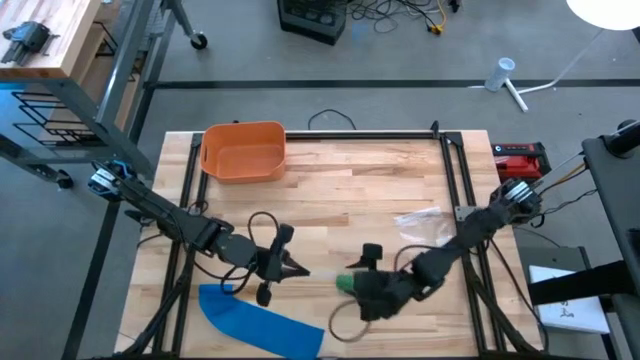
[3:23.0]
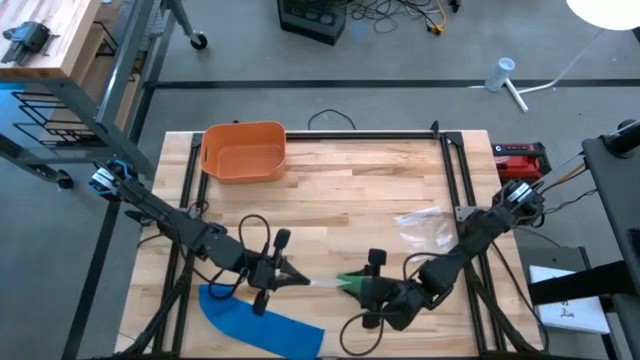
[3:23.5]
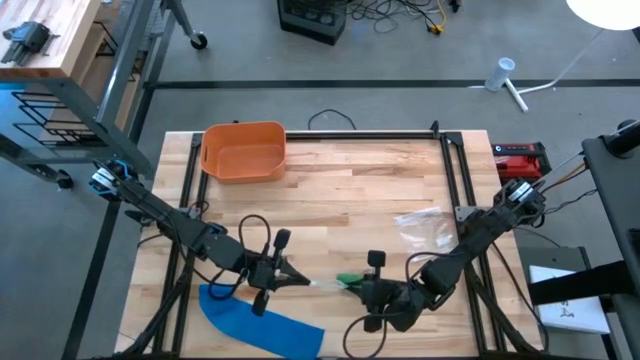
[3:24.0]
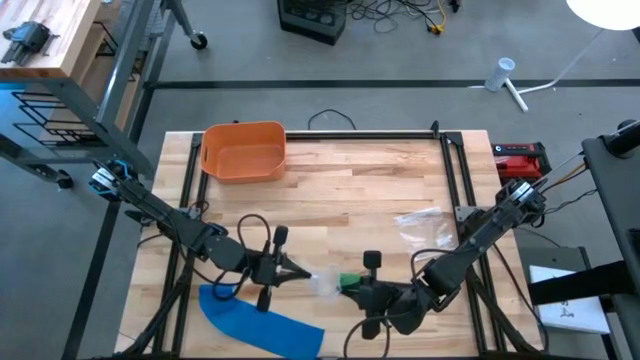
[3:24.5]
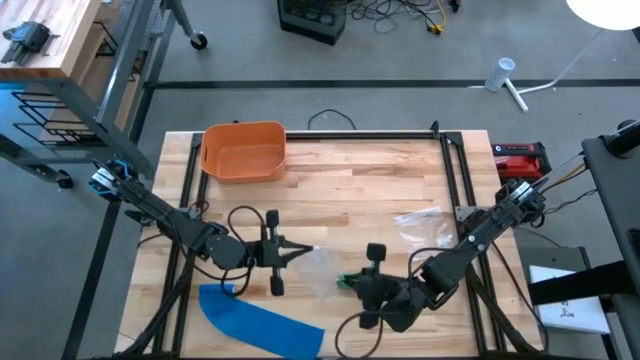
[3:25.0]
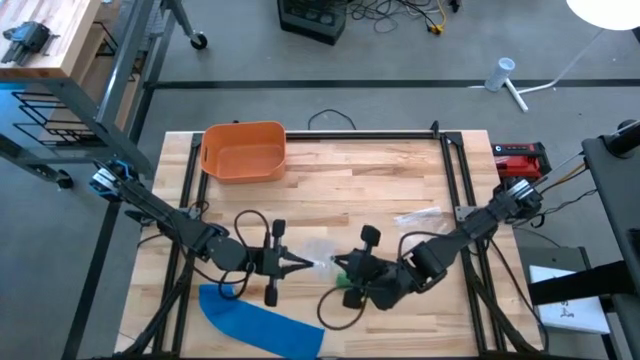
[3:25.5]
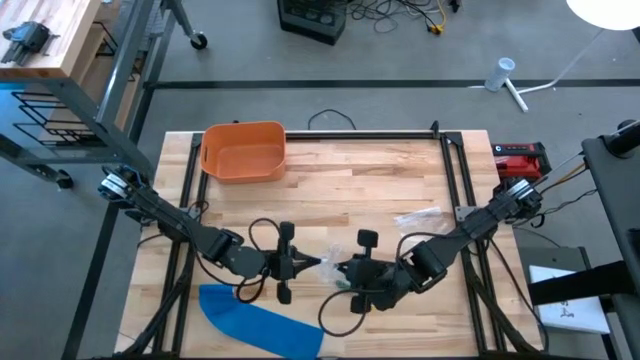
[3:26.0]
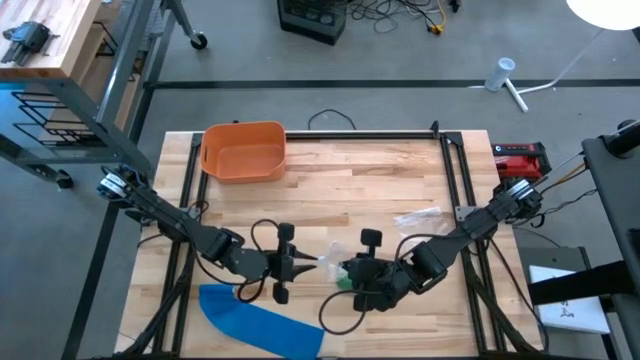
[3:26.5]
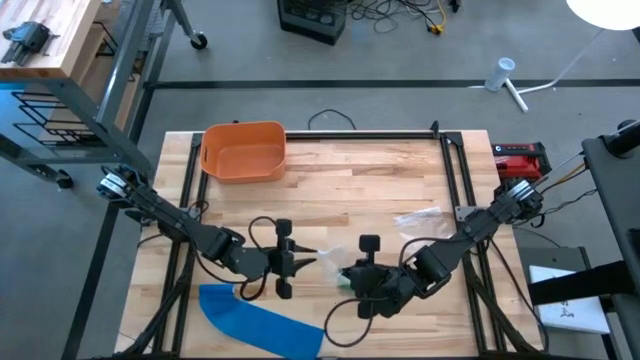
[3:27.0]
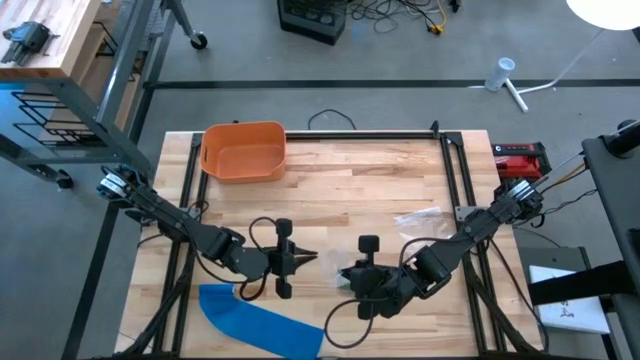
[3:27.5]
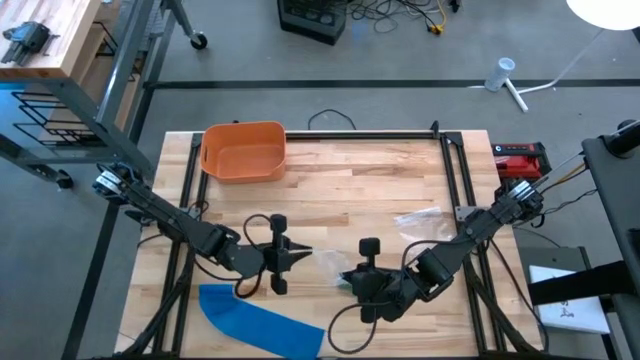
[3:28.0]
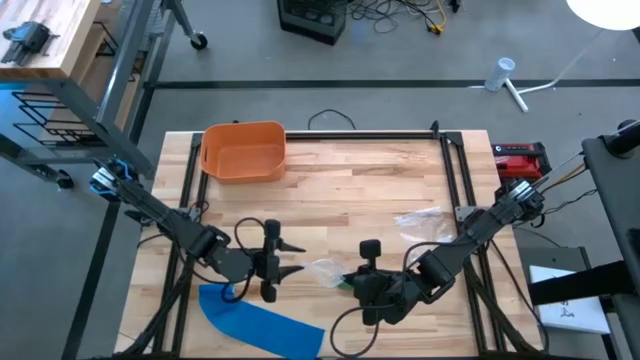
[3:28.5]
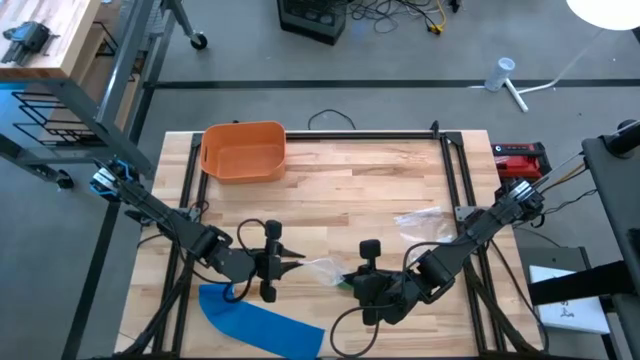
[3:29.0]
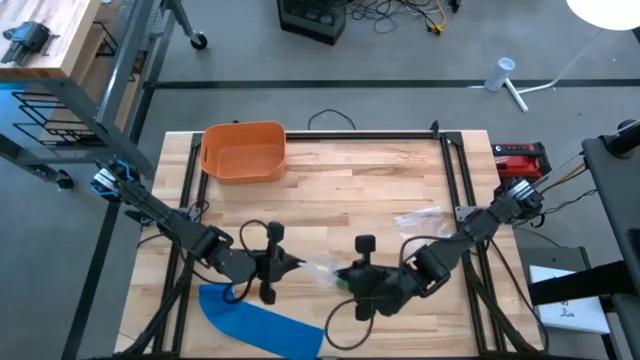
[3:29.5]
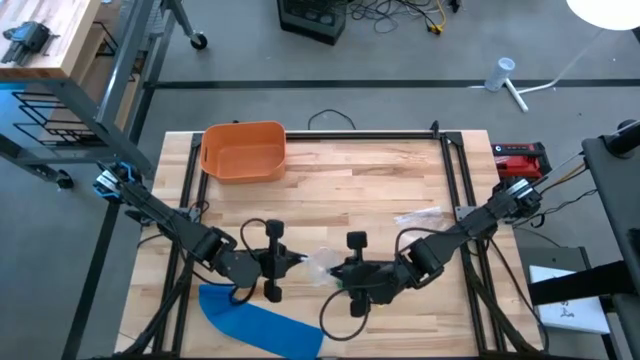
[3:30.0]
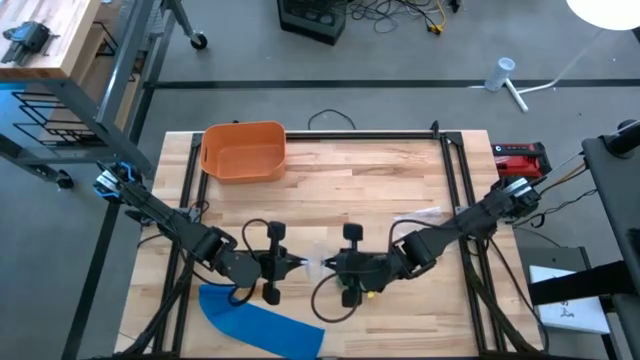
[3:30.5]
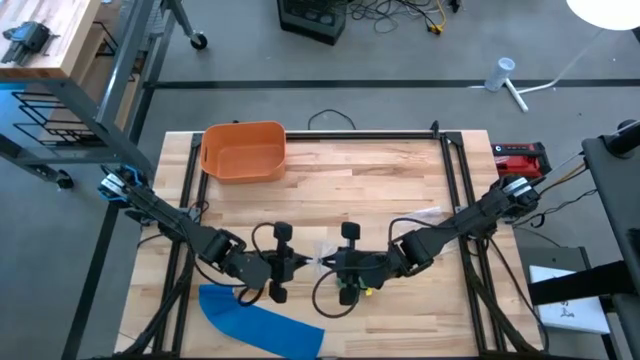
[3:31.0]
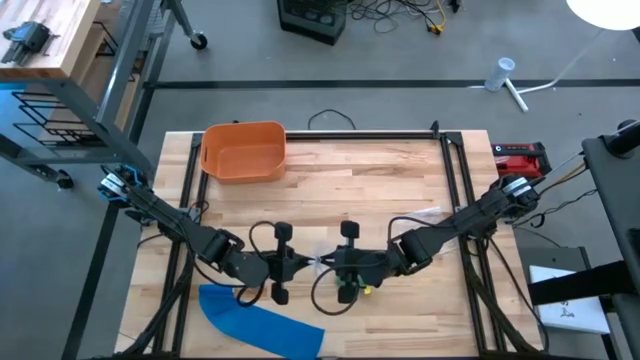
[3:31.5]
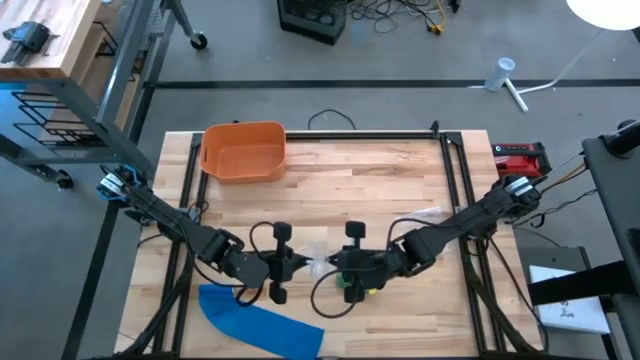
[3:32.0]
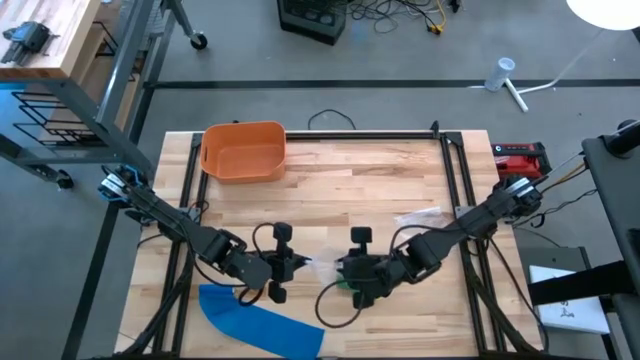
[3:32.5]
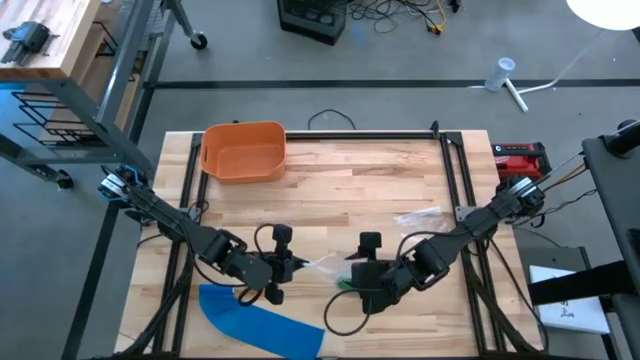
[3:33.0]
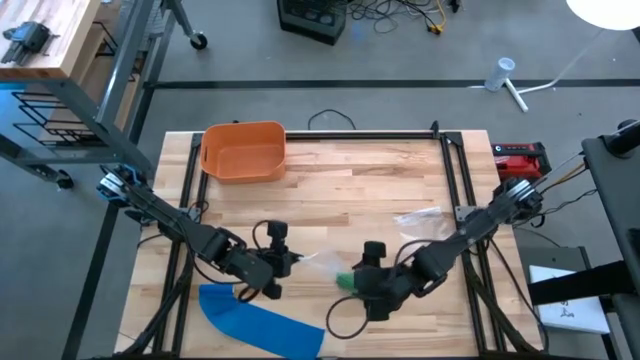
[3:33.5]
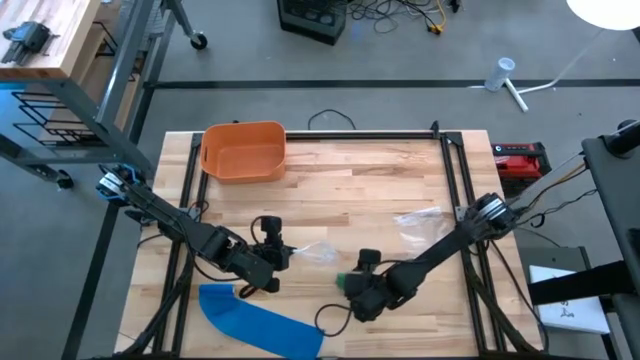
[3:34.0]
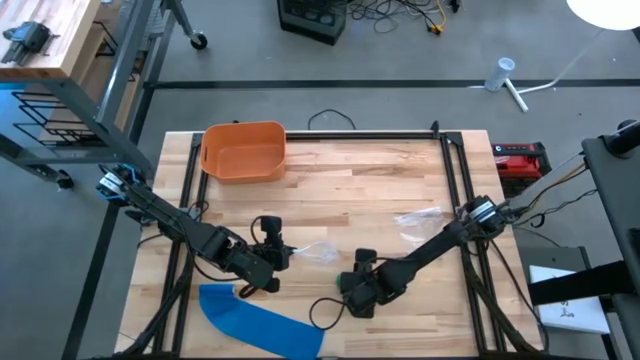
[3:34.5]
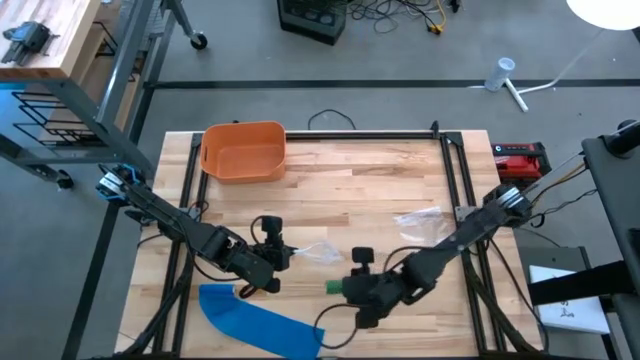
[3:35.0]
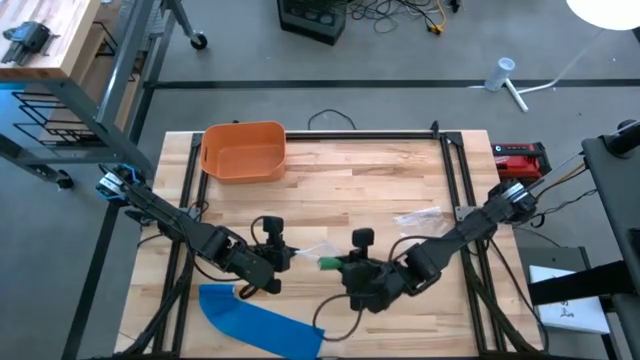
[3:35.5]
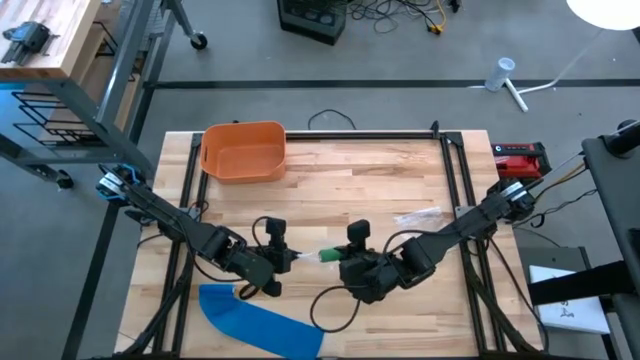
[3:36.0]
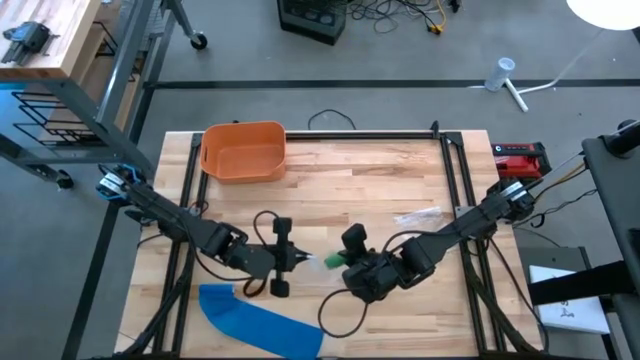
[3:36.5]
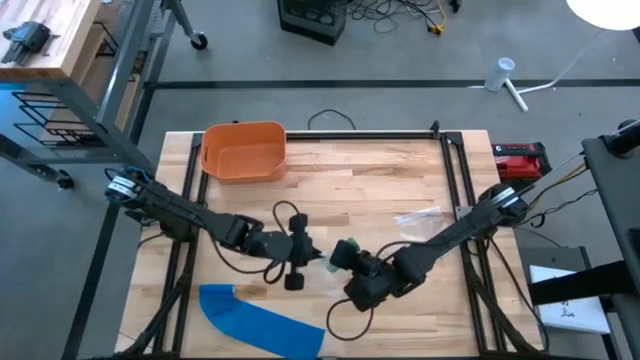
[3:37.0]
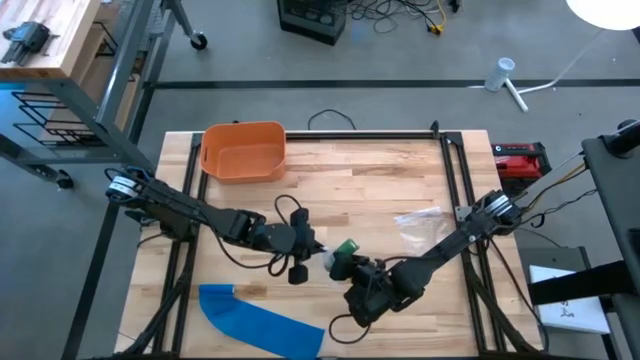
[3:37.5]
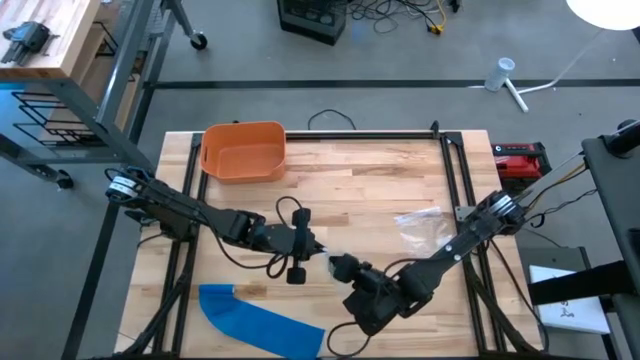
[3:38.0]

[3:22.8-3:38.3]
Task: Roll bandage
Put the rolled green bandage into the transparent zip bag

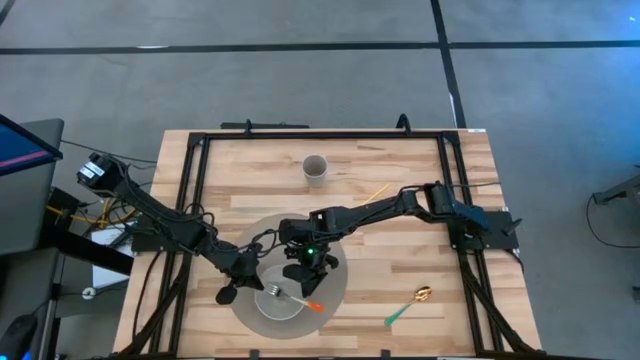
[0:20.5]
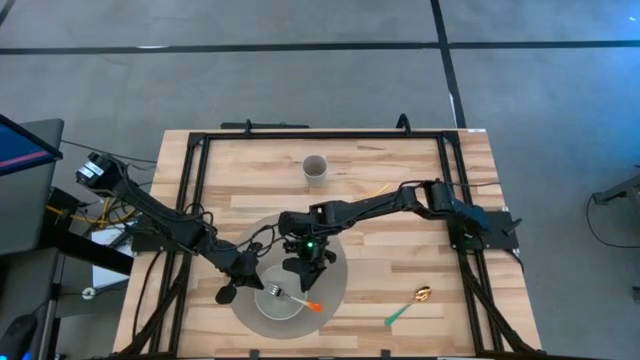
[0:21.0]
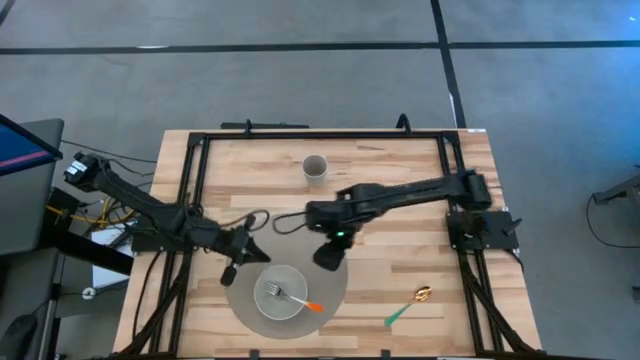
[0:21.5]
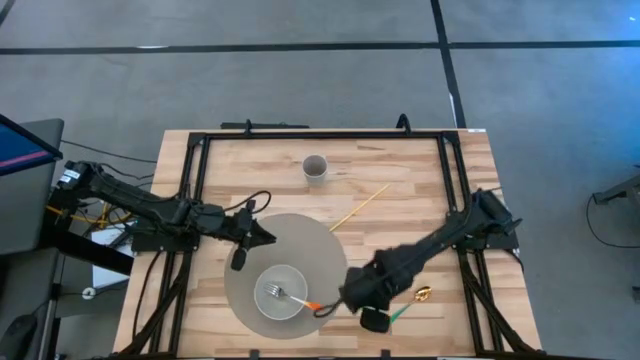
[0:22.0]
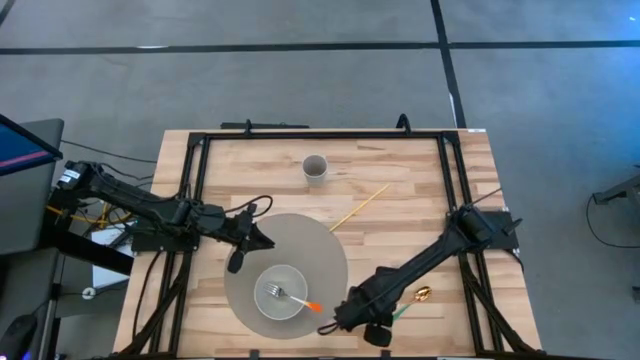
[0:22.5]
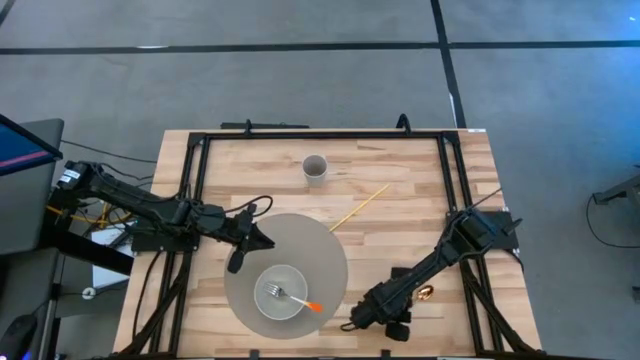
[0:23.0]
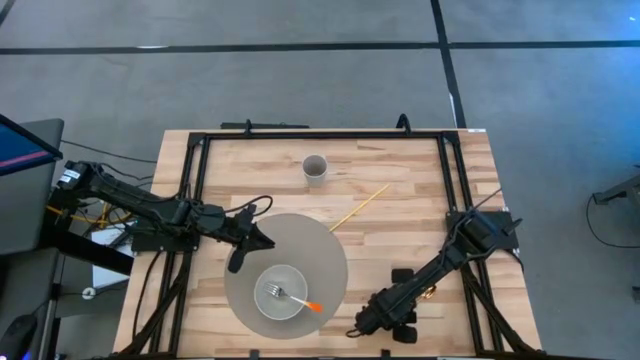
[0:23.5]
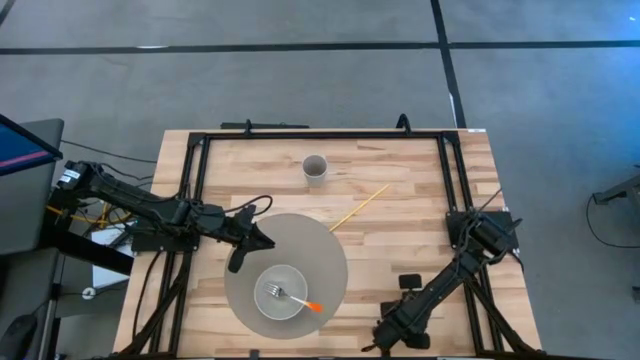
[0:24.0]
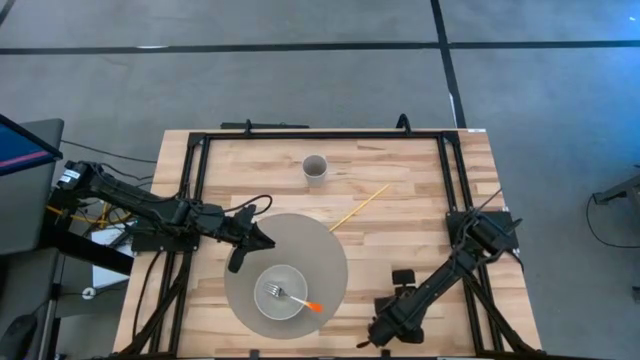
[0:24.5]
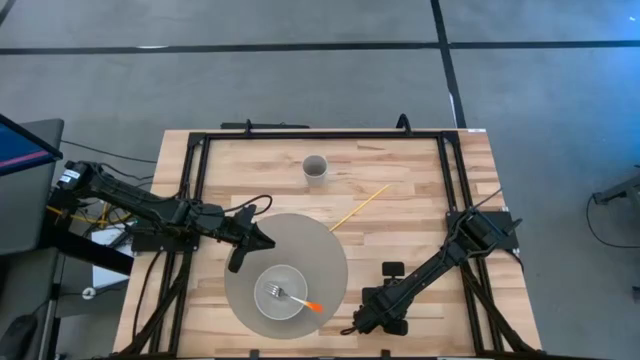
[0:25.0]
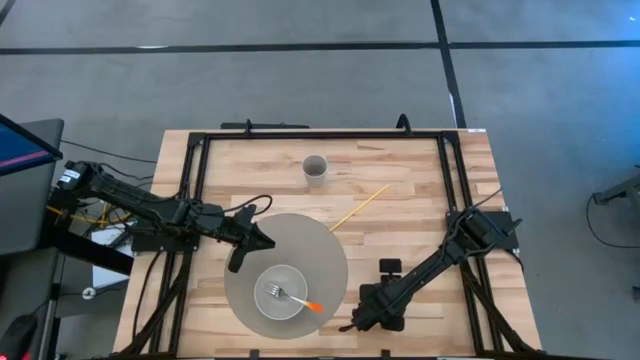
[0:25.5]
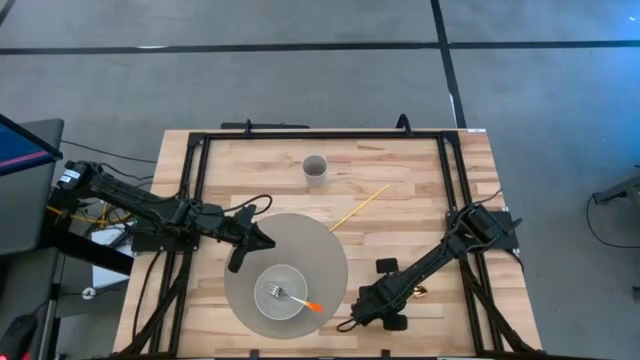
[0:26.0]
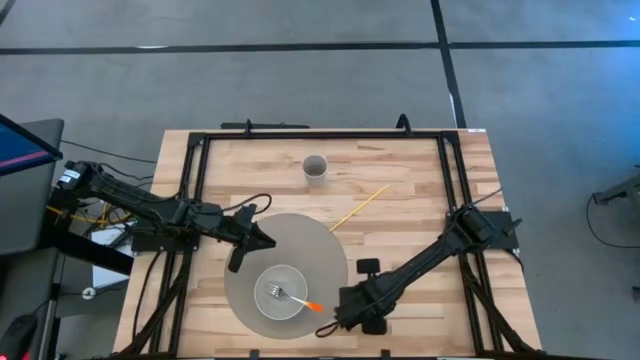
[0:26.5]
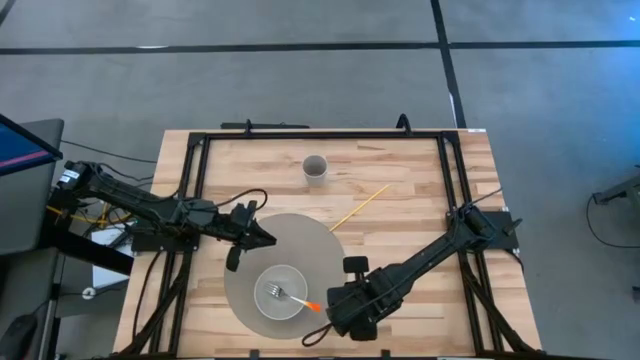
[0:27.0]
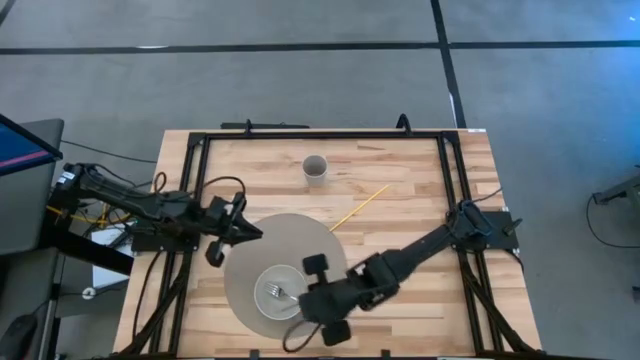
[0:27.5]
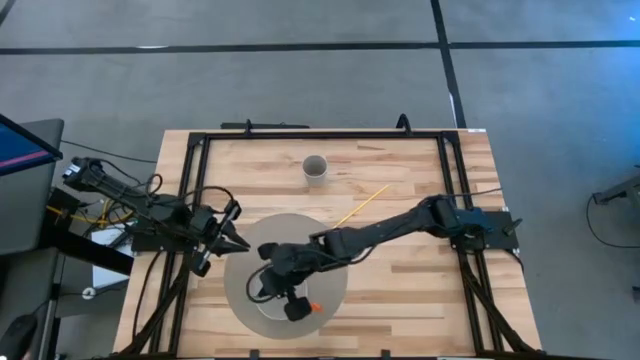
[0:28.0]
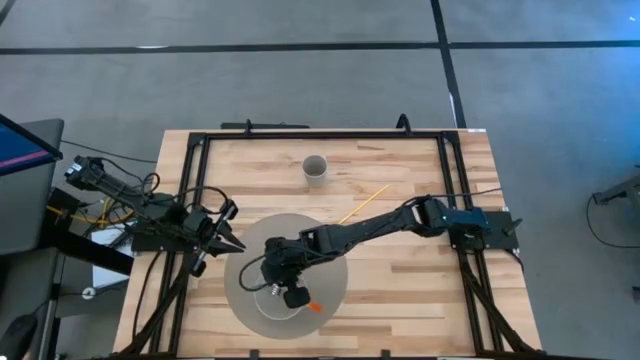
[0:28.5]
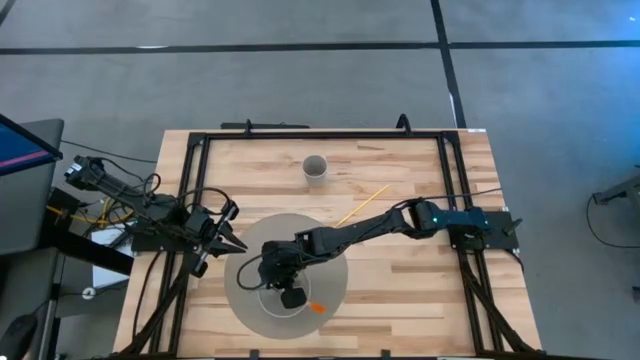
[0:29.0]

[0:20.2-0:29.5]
Task: Pick & Place Utensil
Put the green spoon into the white bowl on the mat
